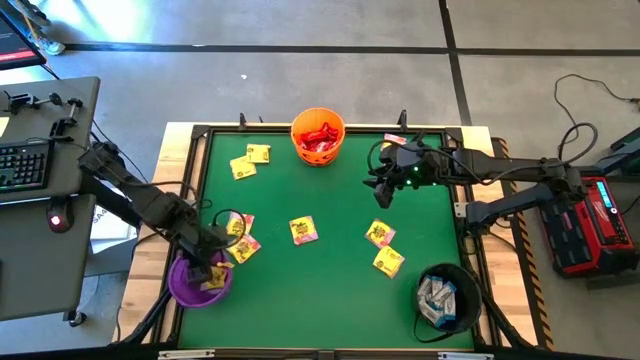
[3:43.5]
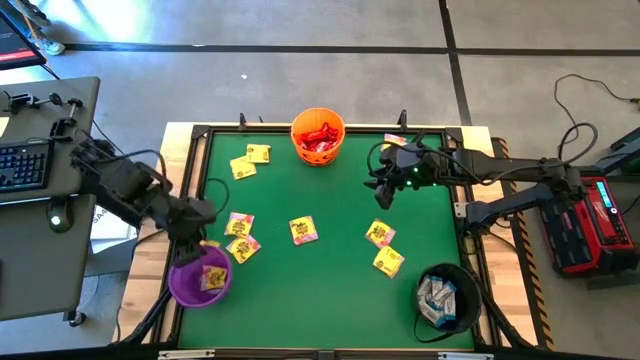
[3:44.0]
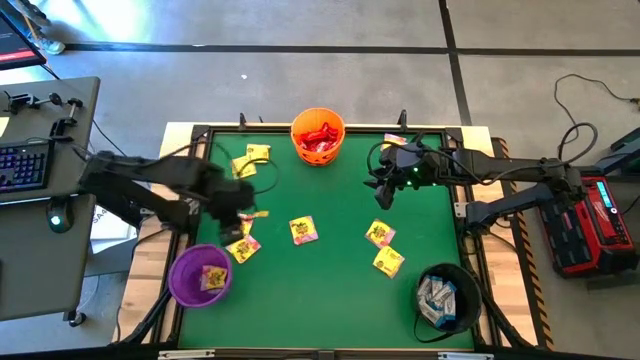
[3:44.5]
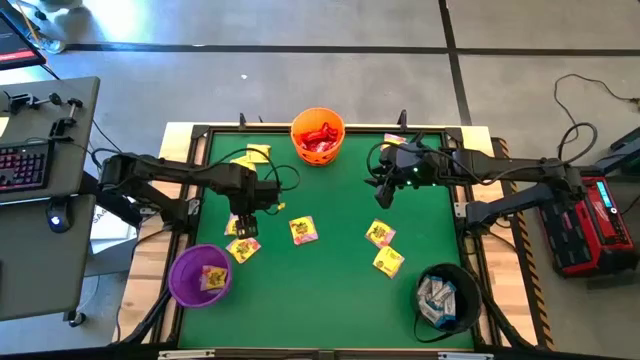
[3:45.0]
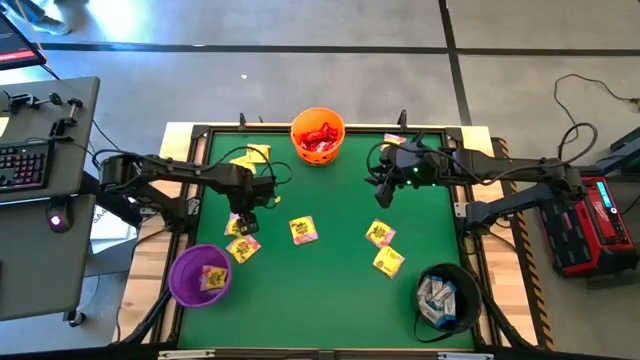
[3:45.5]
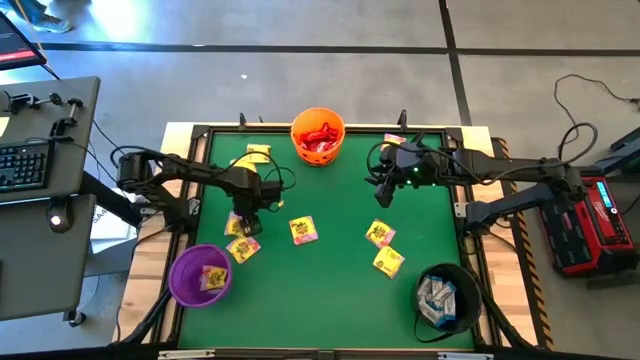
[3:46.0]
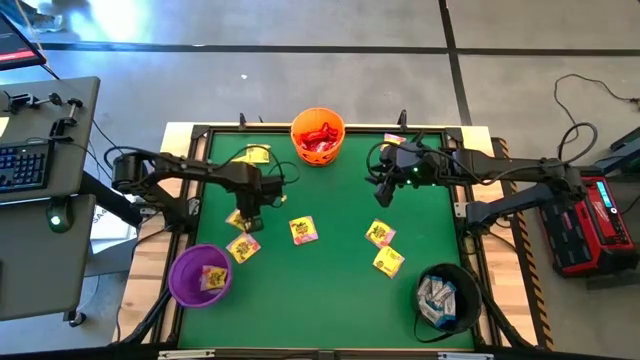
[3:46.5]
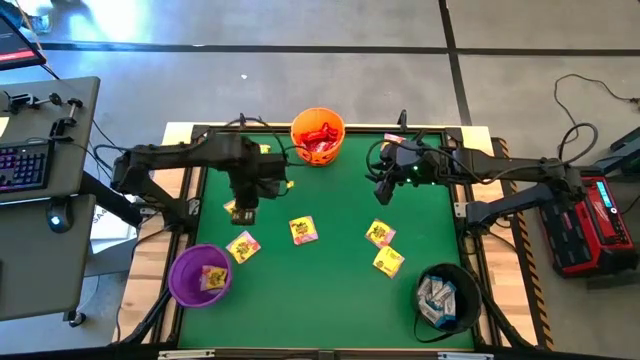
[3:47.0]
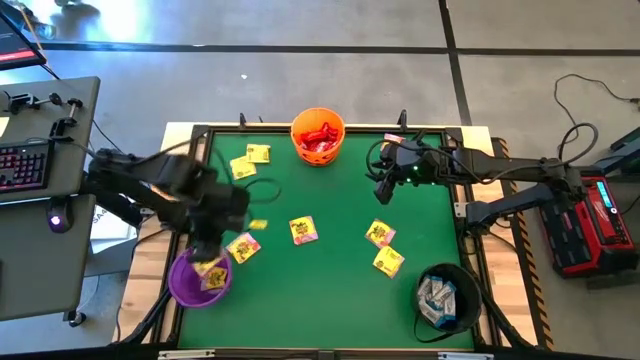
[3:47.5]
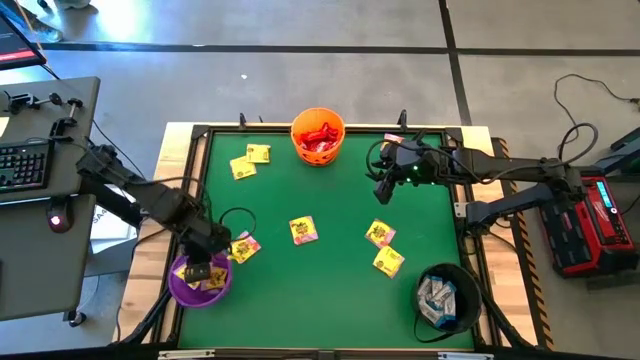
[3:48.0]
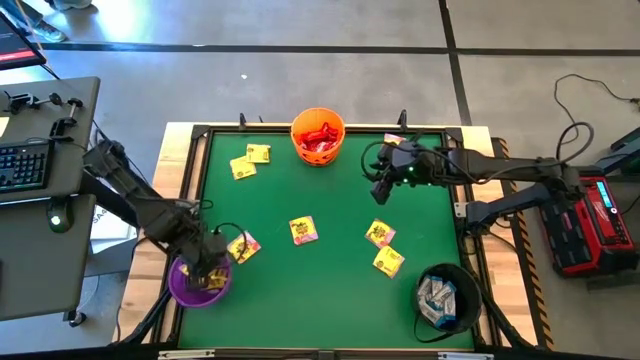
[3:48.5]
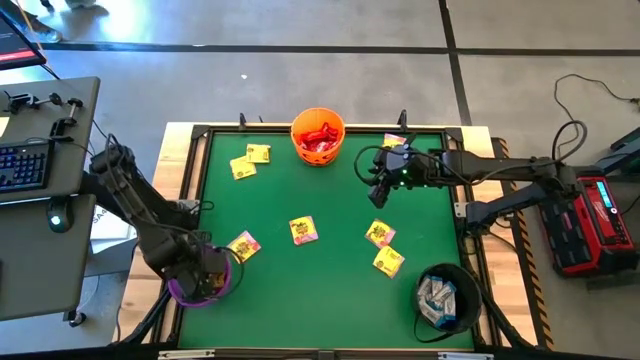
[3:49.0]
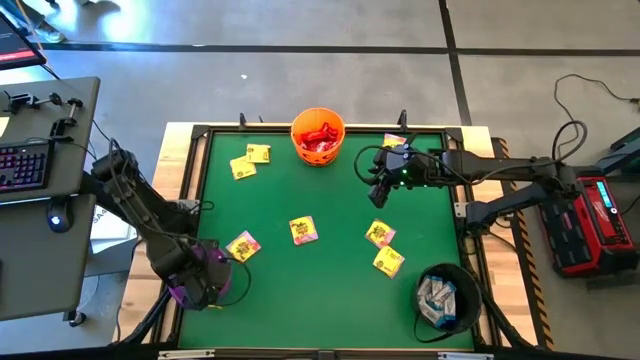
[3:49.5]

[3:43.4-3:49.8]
Task: Sort candy by brand, put in halloween buckets
Put the yellow candy into the purple bucket

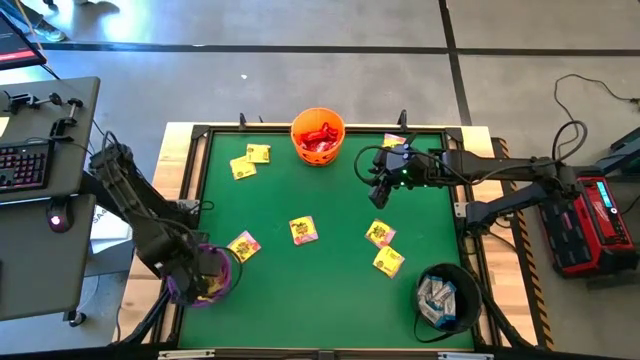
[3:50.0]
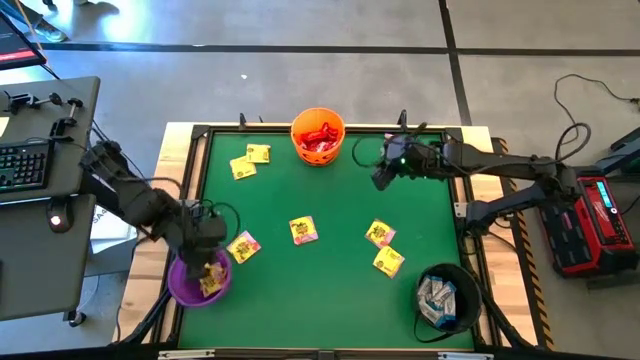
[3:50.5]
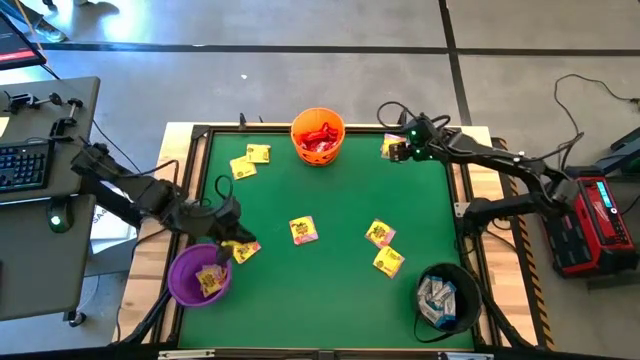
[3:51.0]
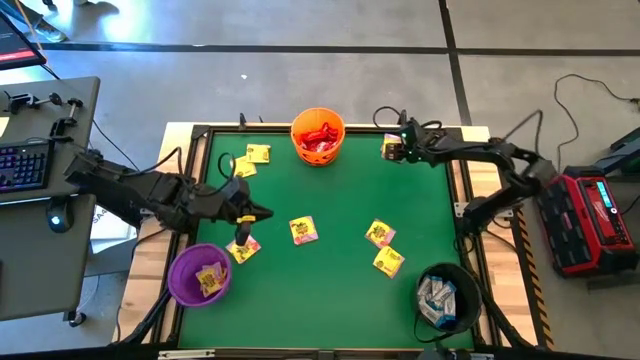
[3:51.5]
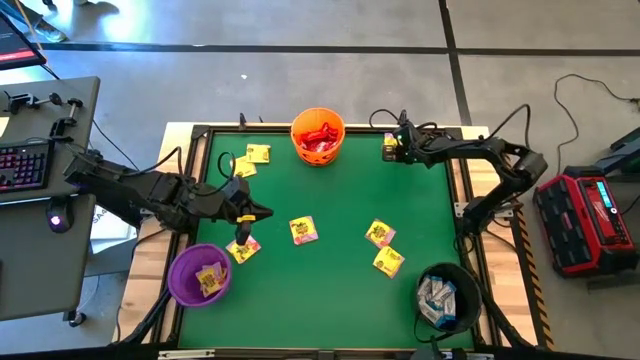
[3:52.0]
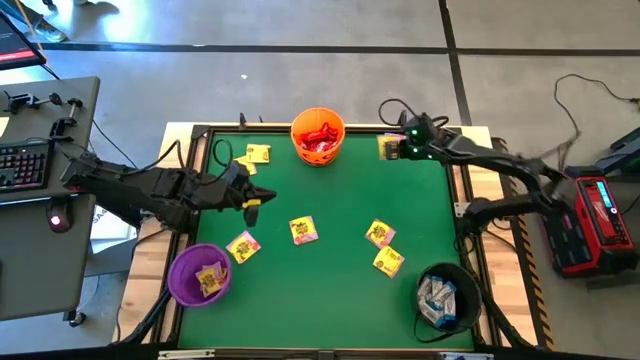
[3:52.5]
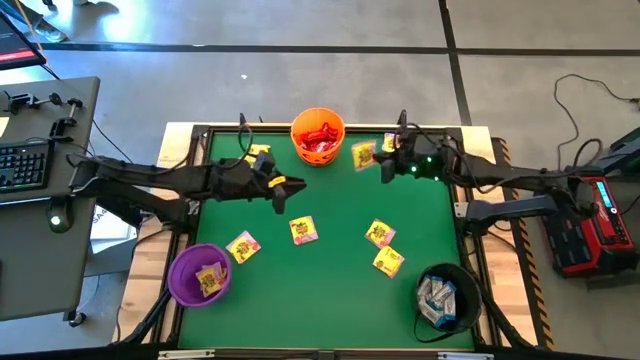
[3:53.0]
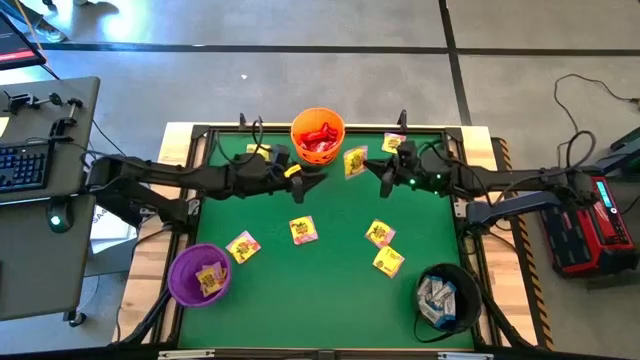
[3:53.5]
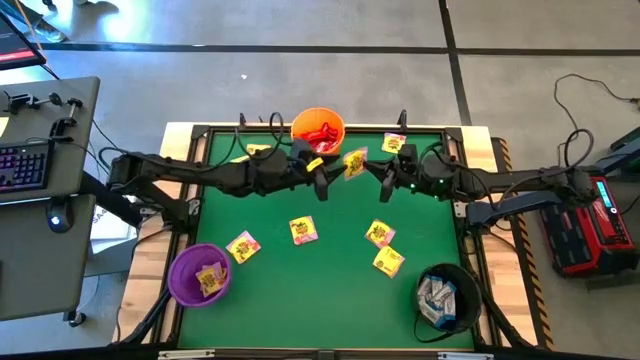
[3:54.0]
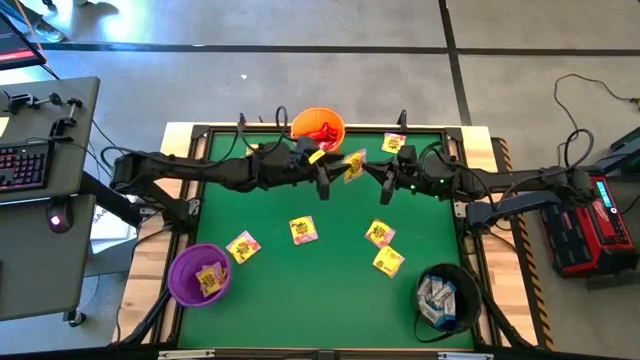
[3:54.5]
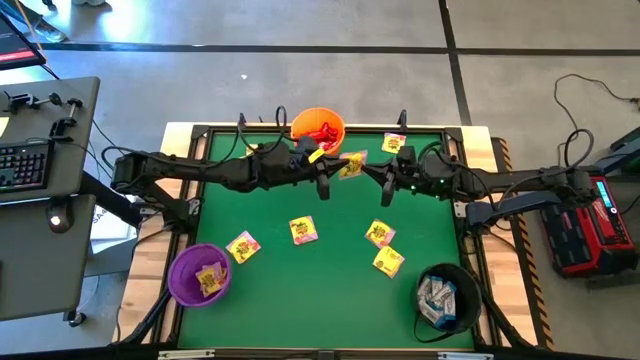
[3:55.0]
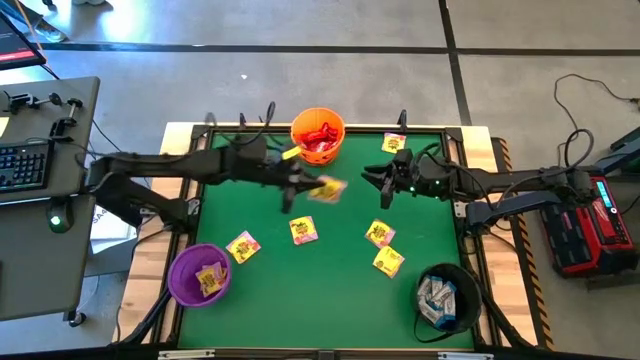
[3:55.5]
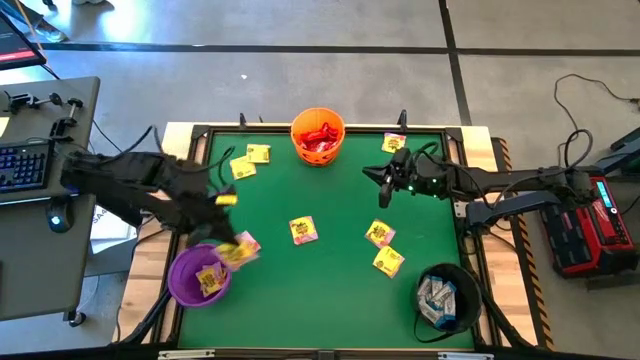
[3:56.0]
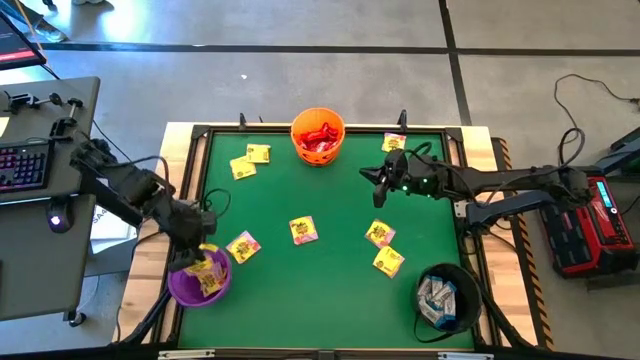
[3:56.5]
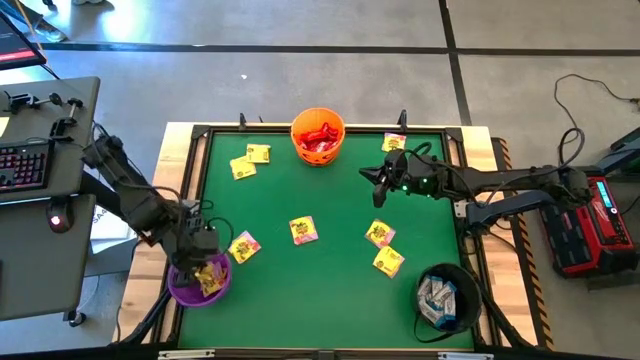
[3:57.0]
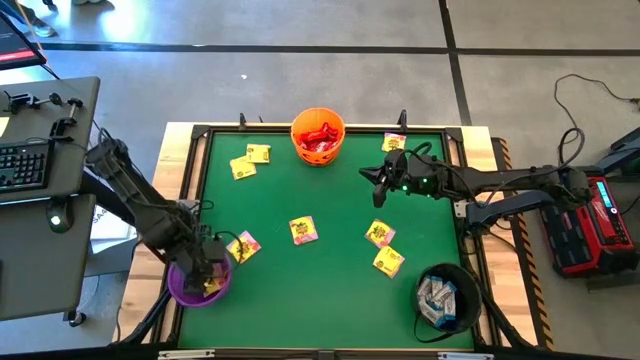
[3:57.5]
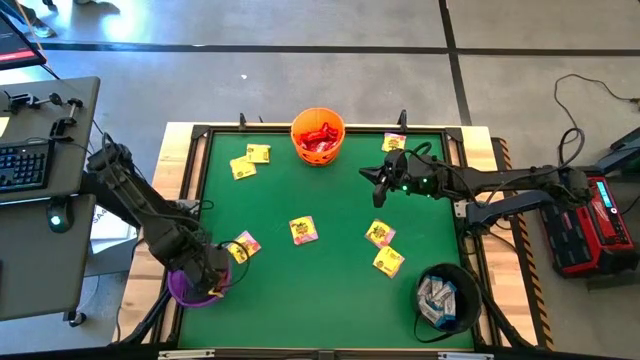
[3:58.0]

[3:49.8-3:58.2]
Put the yellow candy into the purple bucket

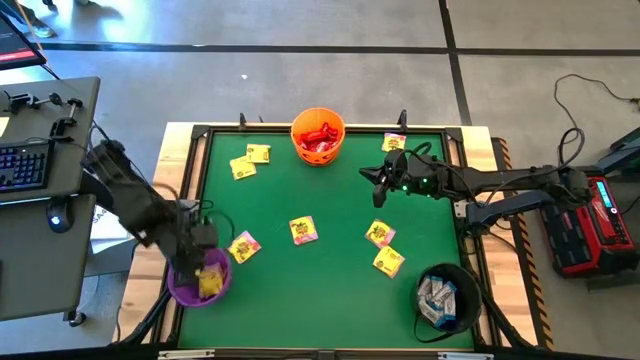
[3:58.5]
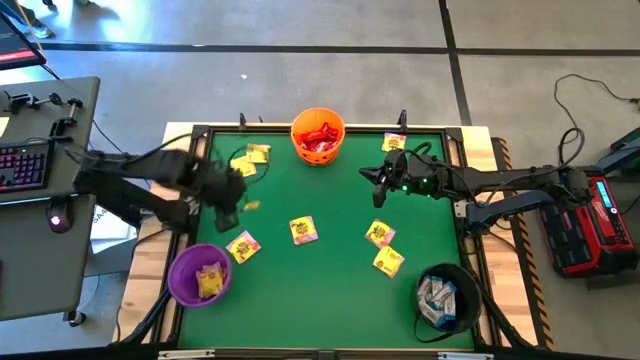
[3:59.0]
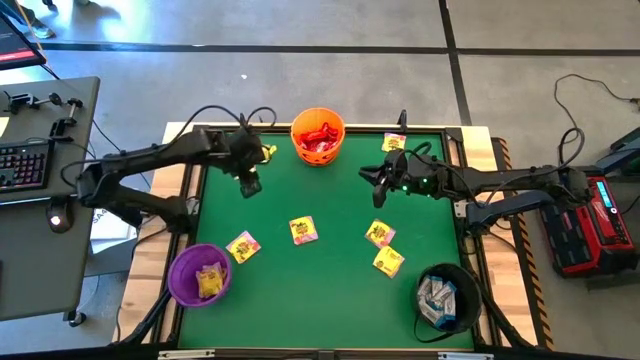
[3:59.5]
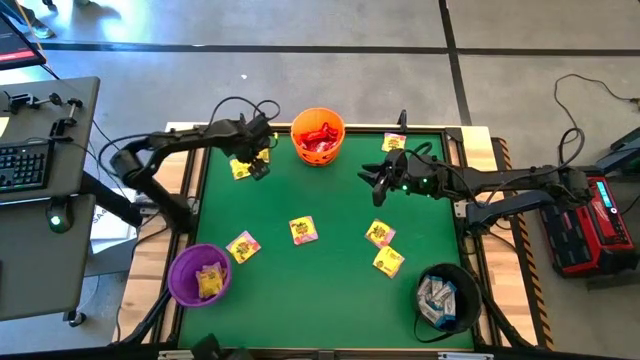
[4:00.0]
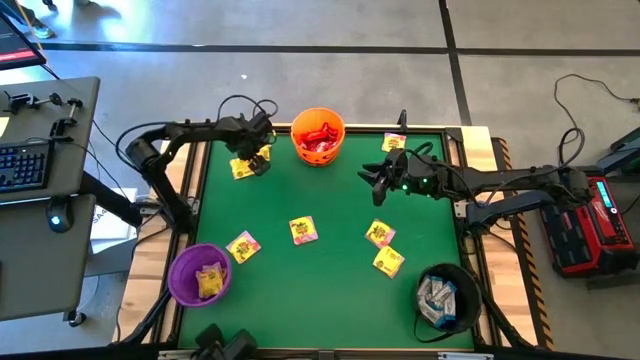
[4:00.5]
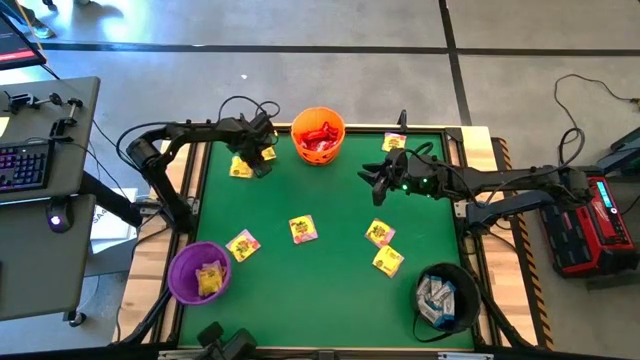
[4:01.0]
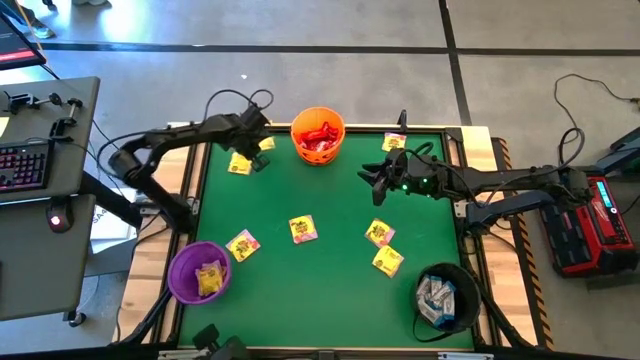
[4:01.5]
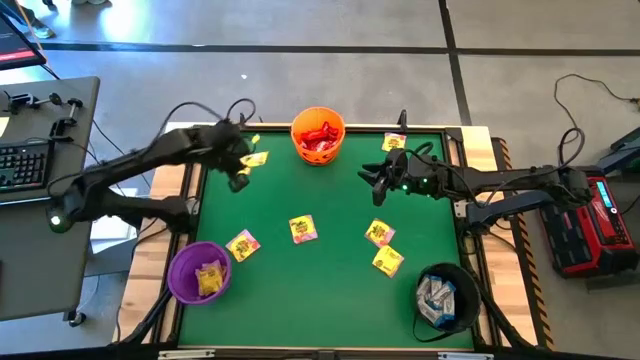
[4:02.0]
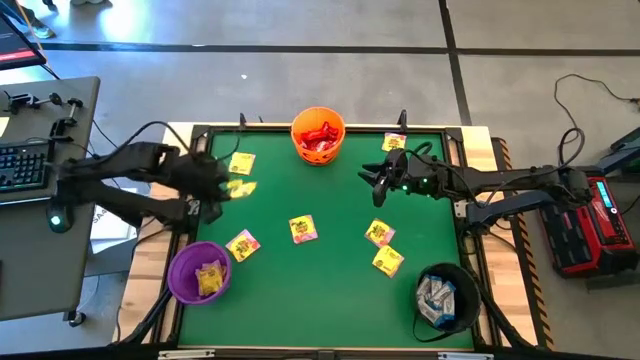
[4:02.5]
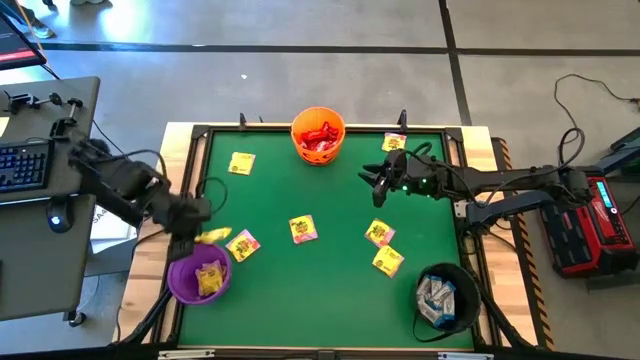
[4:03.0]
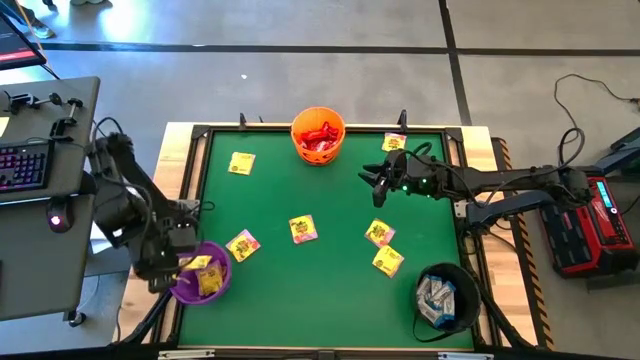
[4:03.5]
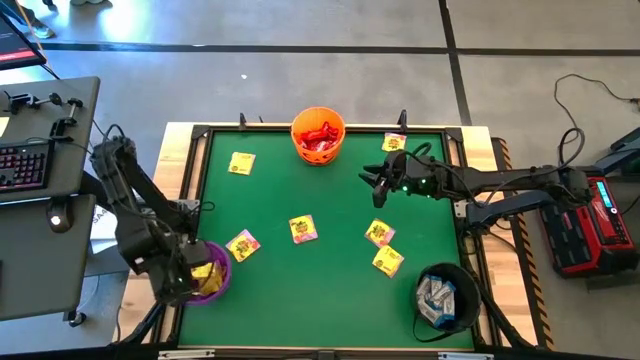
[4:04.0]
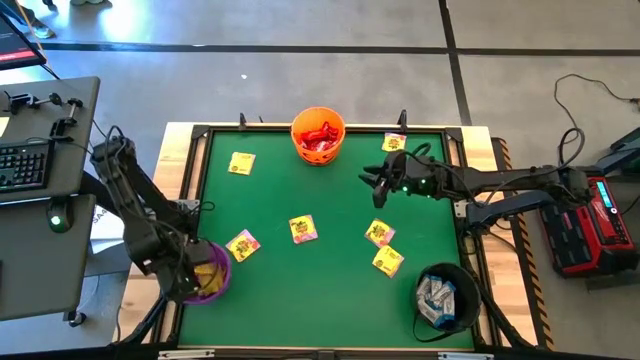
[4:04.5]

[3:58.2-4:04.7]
Put the yellow candy into the purple bucket

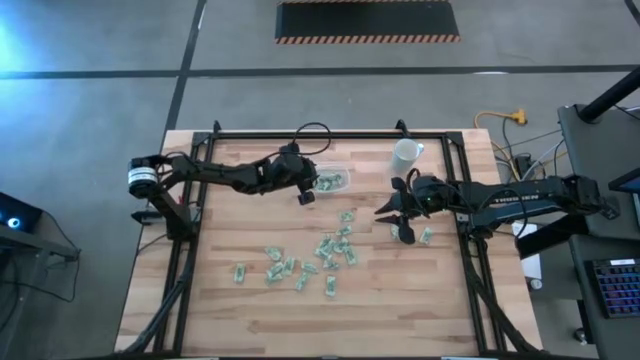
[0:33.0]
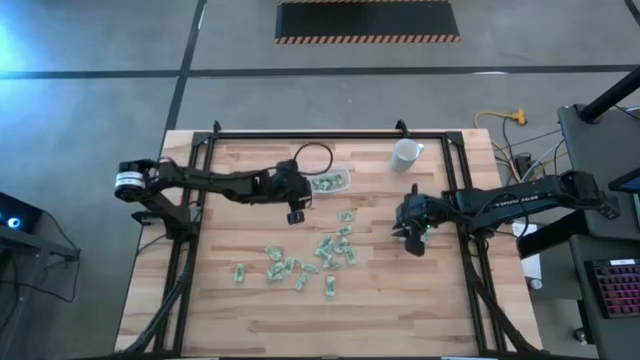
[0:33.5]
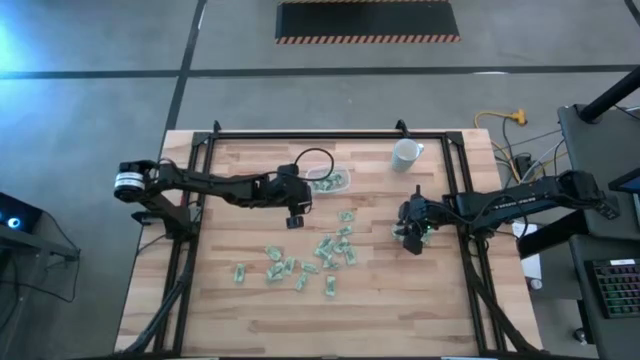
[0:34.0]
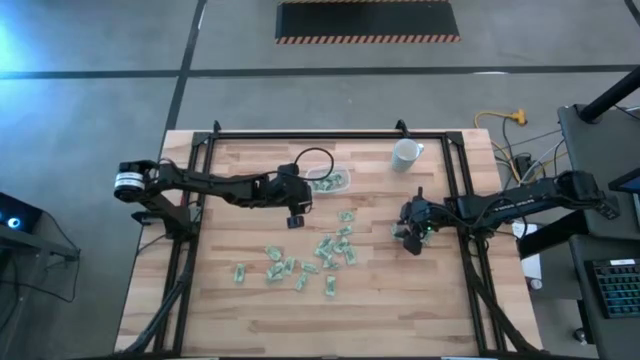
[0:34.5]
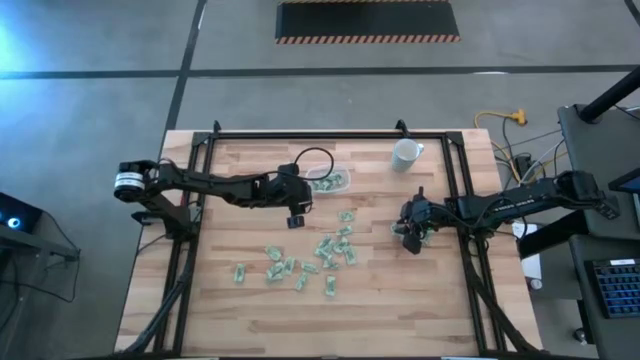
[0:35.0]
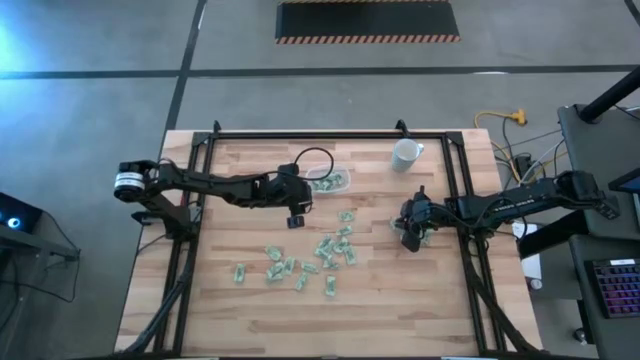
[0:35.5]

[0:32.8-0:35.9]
Task: Pick and place Stevia / Truvia into bins
Put the stevia packet into the transparent container
